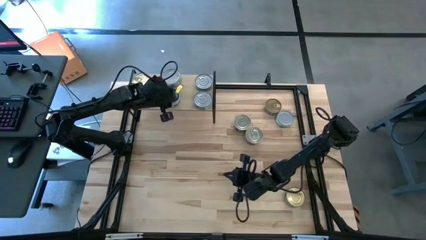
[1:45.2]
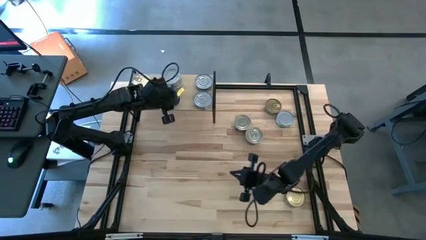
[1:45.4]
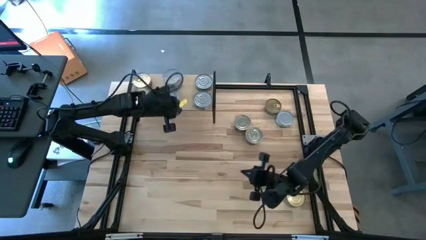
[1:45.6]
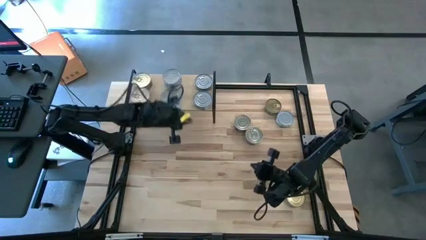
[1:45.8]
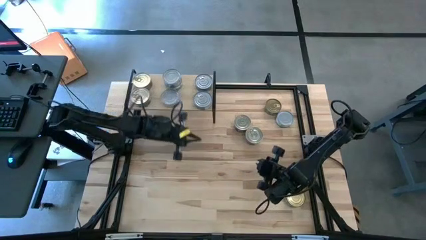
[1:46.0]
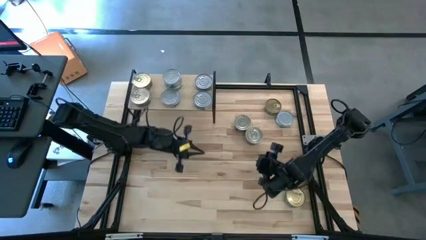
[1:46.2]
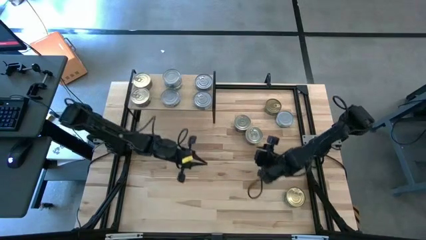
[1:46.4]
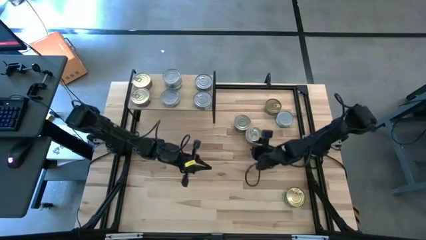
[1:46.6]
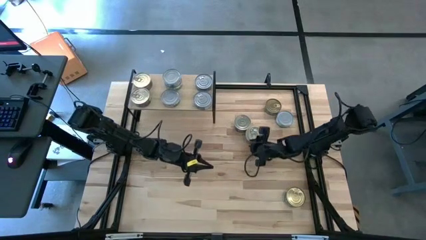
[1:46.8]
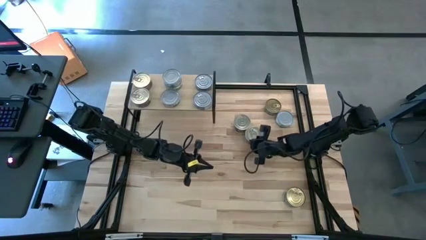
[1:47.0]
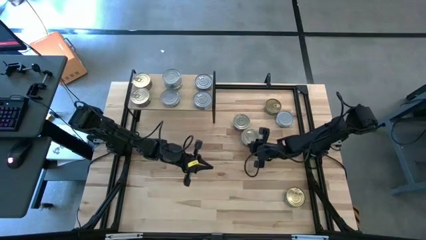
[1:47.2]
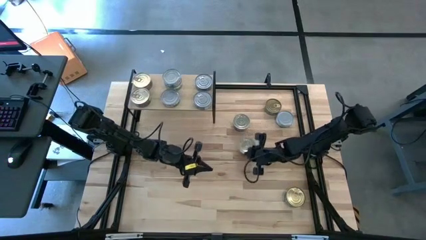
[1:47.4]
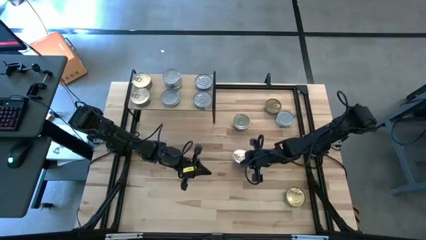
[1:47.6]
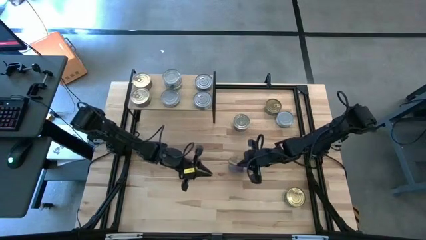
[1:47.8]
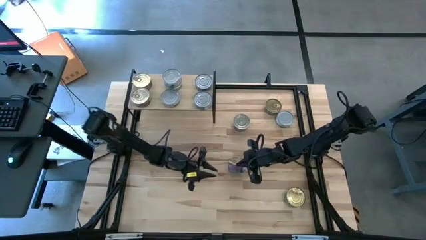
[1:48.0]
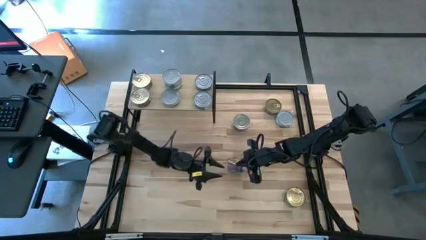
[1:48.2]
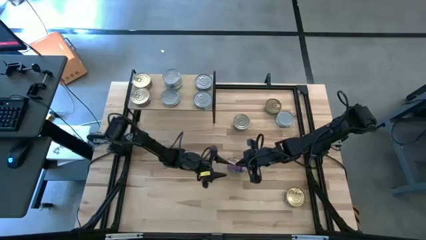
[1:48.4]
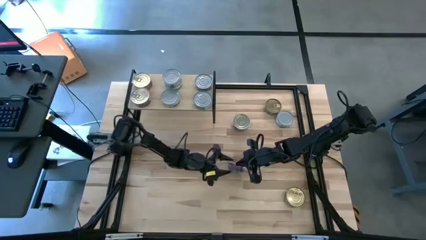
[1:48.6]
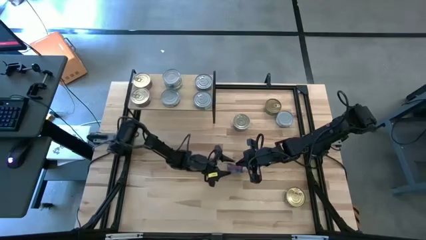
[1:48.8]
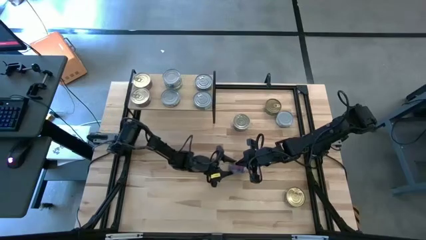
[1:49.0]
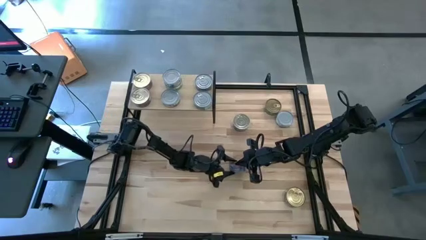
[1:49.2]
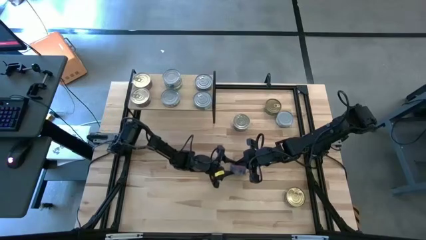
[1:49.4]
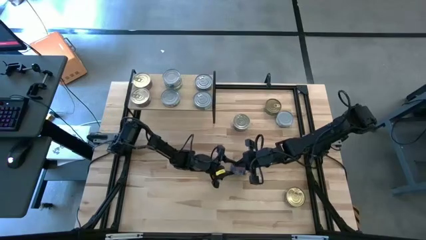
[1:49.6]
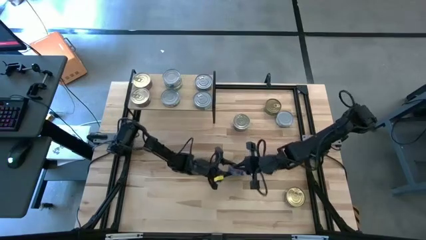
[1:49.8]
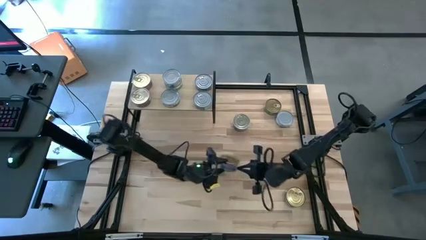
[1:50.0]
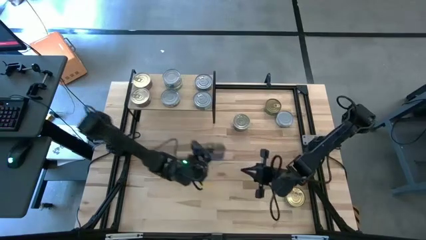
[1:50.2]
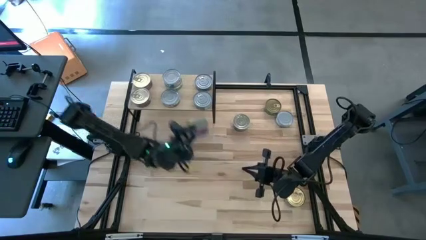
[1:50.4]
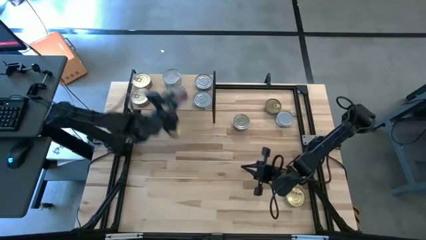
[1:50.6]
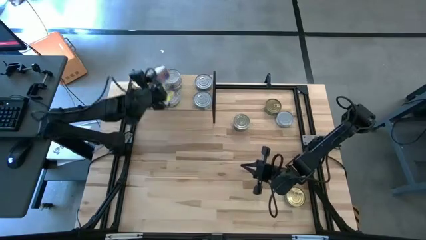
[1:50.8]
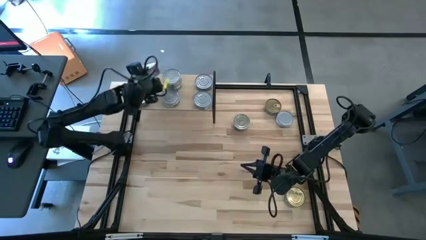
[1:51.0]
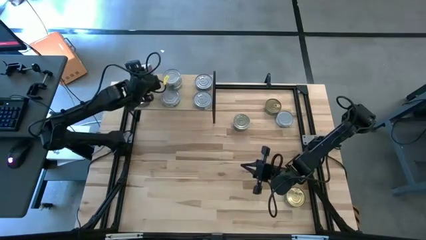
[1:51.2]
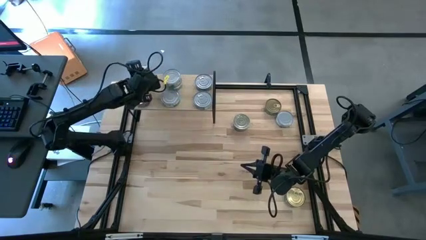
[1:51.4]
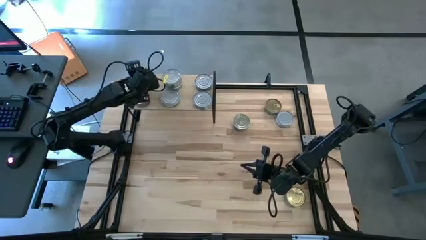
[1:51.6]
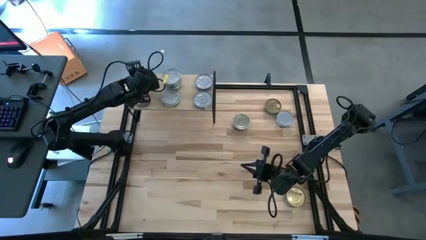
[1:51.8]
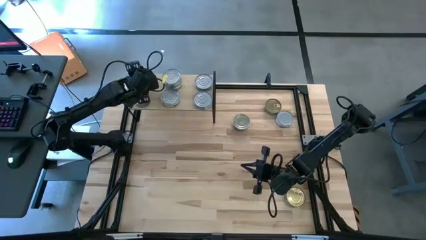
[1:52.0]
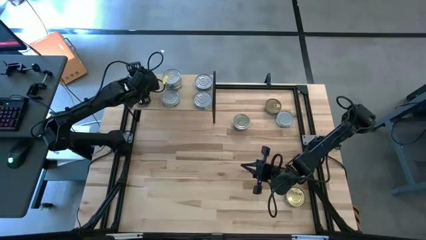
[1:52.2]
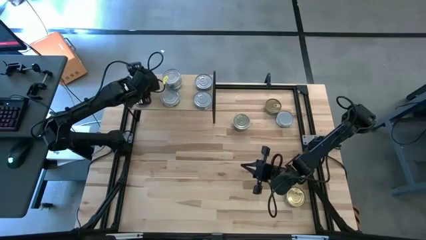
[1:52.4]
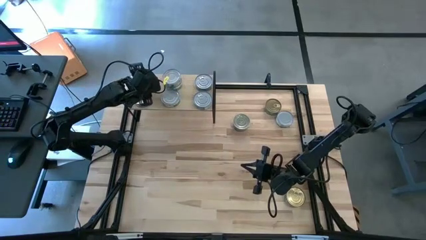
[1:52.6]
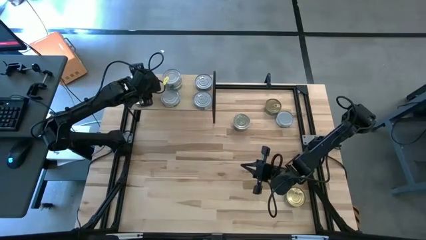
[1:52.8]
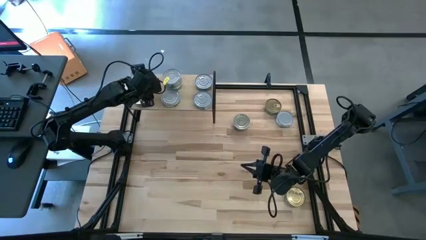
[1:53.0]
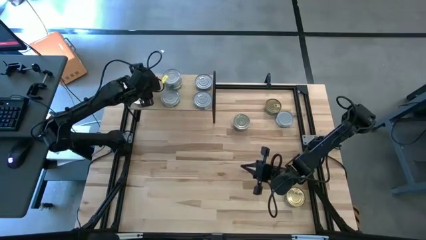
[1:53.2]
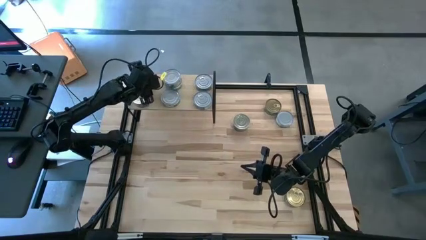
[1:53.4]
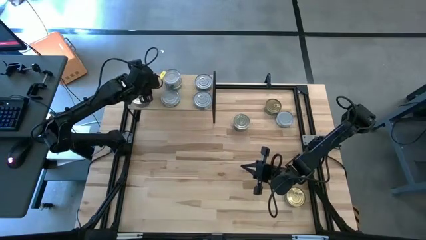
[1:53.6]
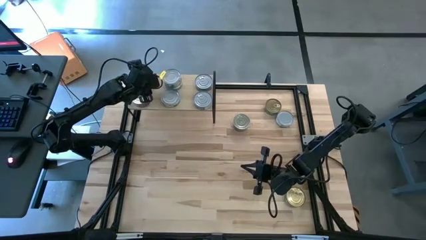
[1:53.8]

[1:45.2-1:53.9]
Task: Stack canned seafood by type on shelf
Stack the blue tuna can on top of the other blue tuna can on the shelf

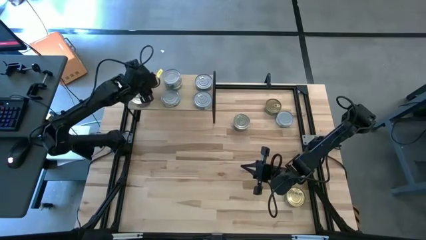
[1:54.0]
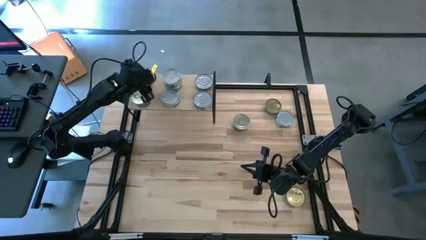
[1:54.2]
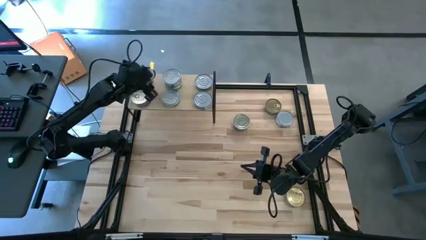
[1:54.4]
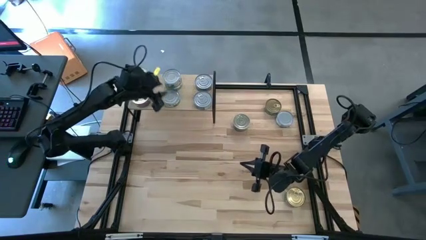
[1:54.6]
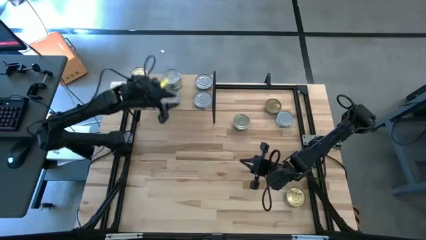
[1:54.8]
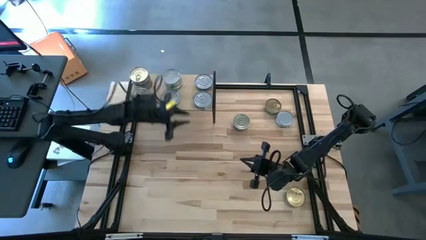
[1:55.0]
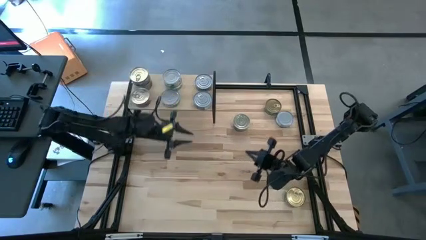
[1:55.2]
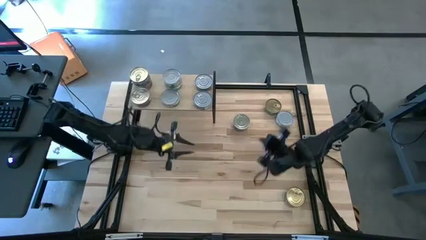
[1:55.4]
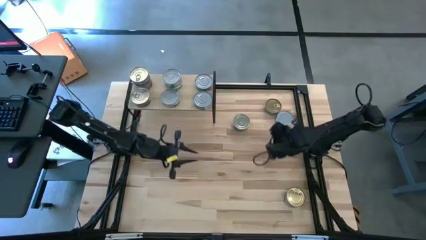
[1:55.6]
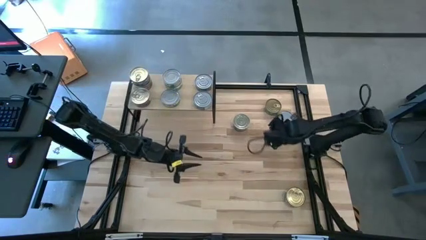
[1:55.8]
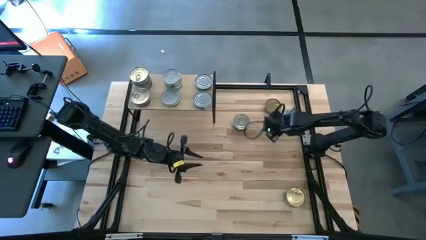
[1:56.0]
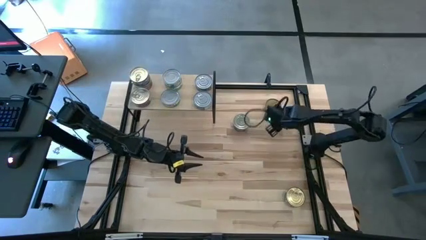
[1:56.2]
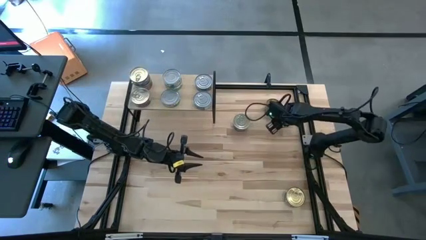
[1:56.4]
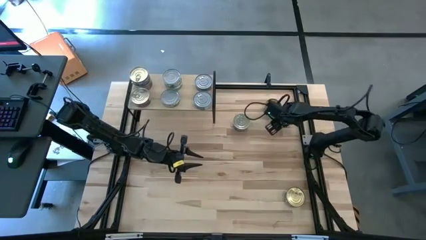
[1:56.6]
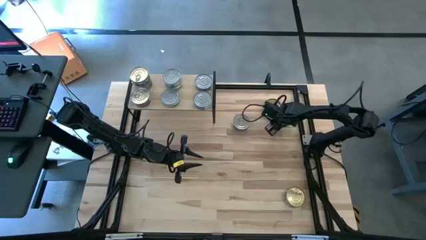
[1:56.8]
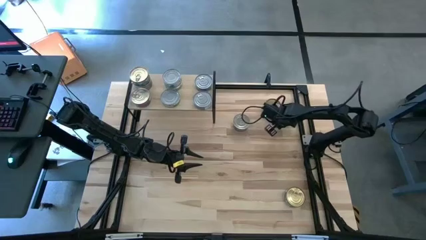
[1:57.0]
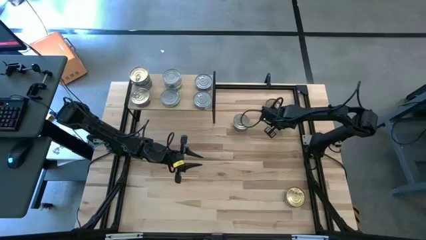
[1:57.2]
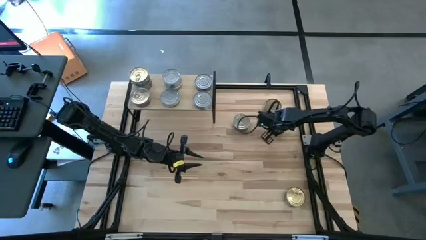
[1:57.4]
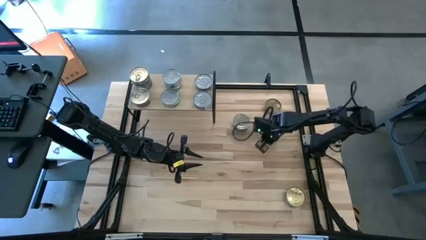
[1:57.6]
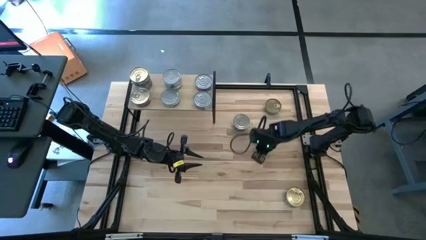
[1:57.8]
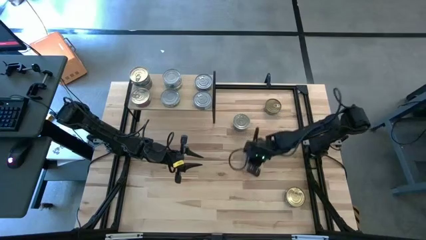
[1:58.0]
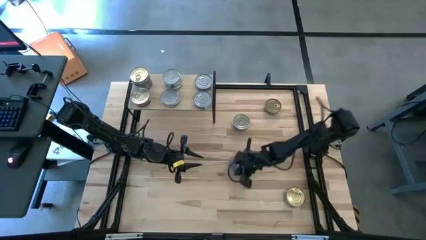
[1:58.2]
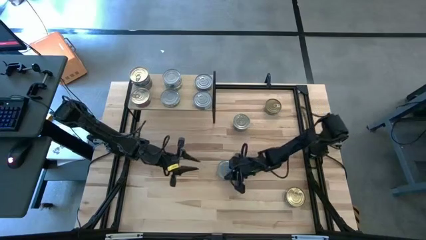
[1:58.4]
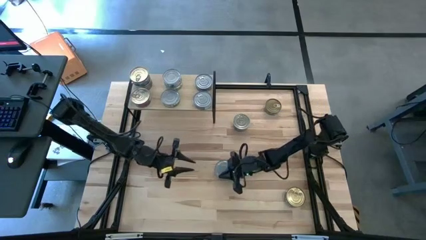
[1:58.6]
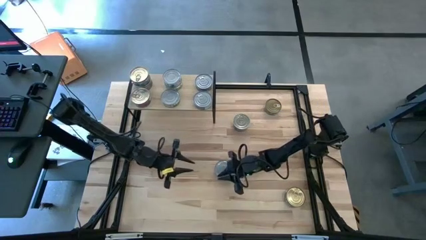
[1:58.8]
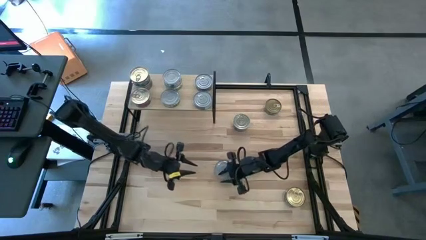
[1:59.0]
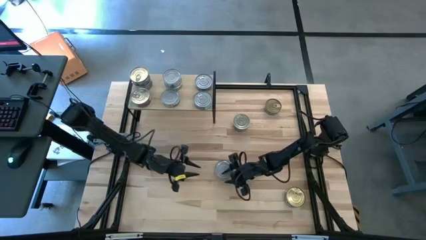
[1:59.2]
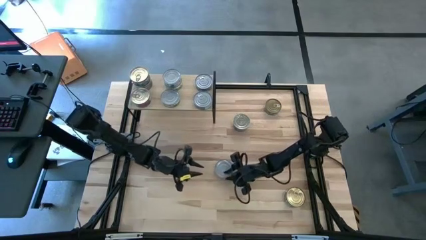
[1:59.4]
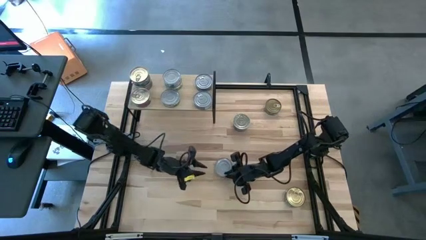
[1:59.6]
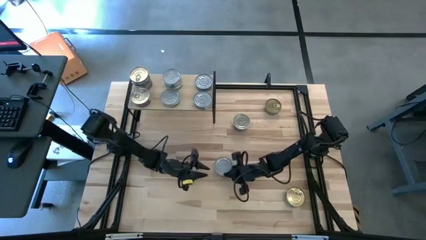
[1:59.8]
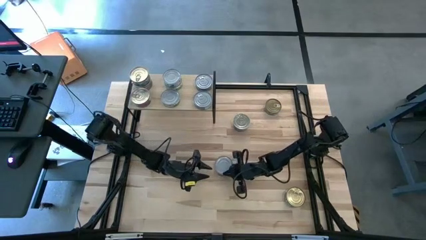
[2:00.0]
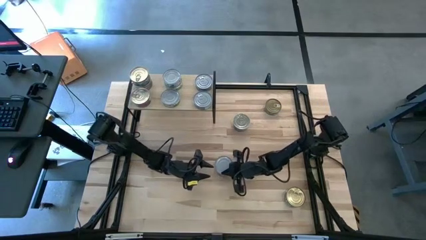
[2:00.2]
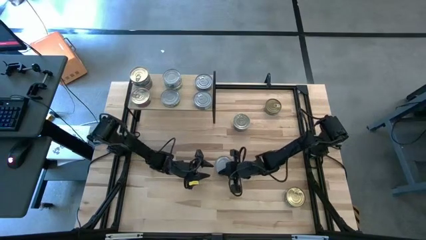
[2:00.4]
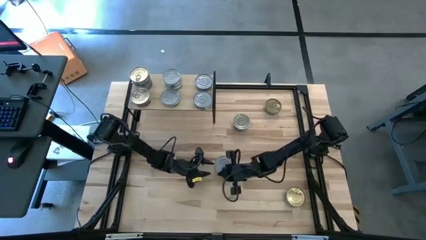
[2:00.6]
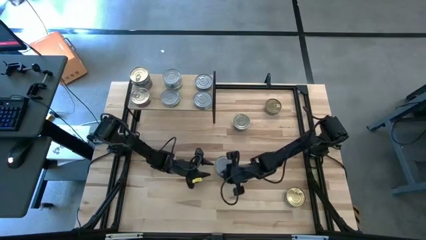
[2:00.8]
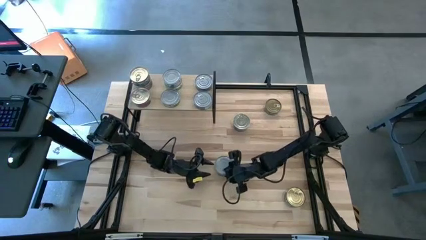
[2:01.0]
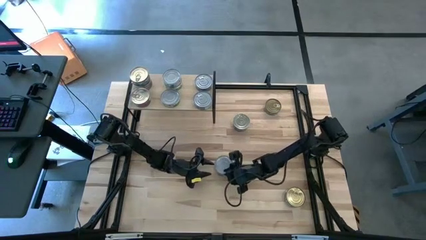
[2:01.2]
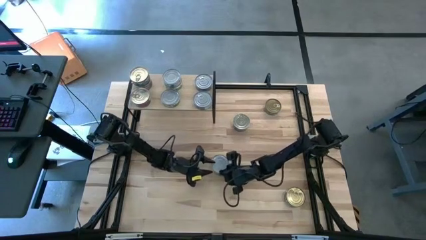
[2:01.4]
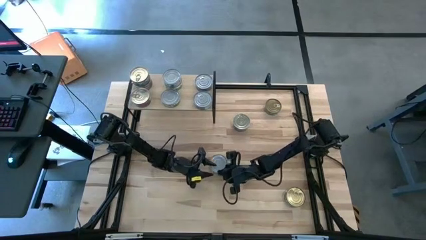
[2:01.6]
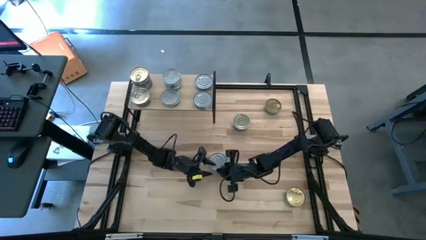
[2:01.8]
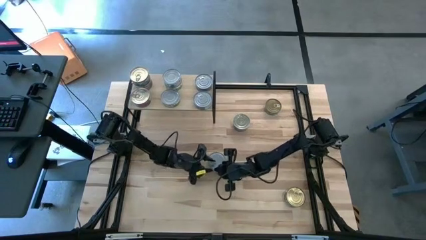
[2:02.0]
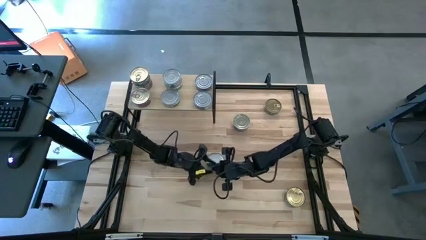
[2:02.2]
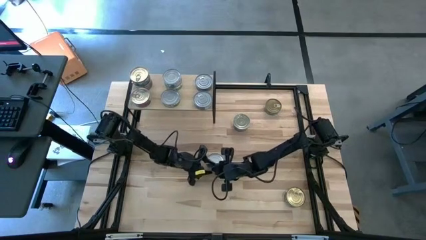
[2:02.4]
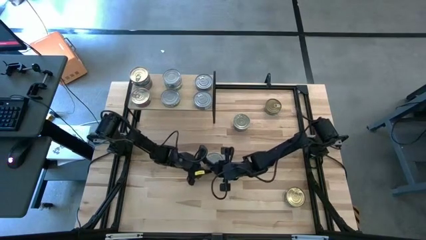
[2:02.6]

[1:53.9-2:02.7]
Stack the green white tuna can on top of the other green white tuna can on the shelf
